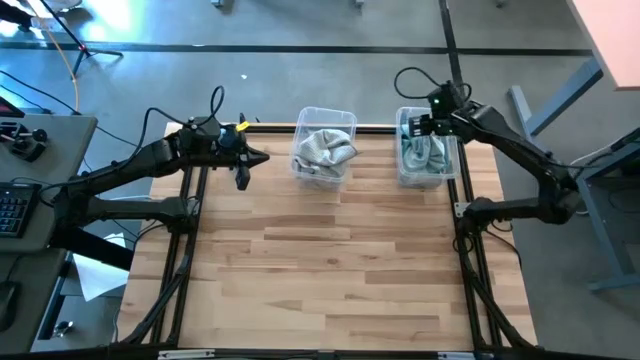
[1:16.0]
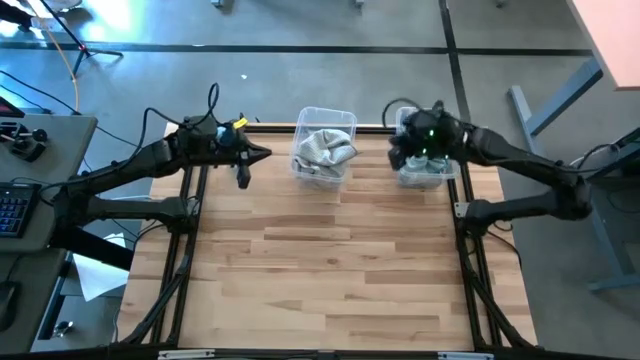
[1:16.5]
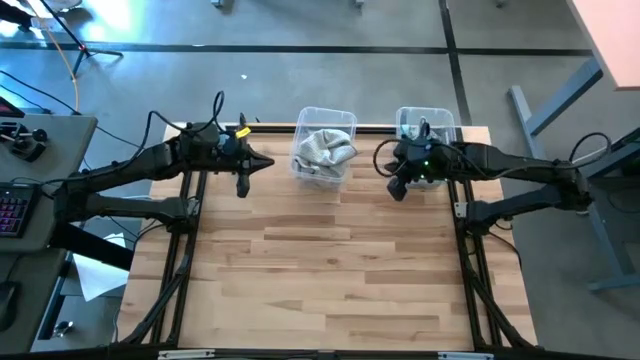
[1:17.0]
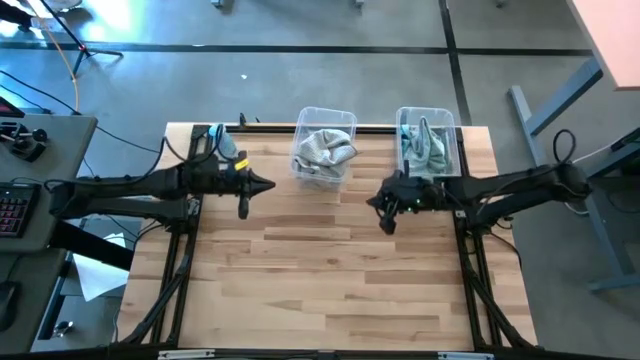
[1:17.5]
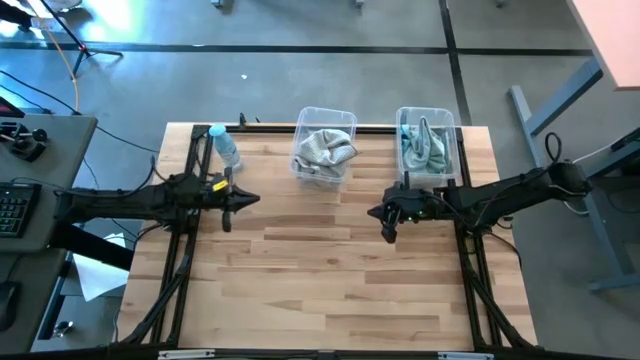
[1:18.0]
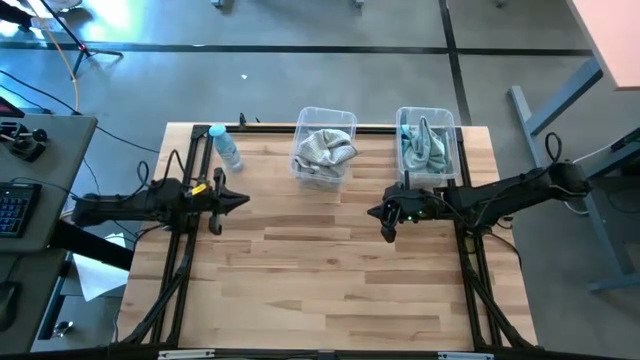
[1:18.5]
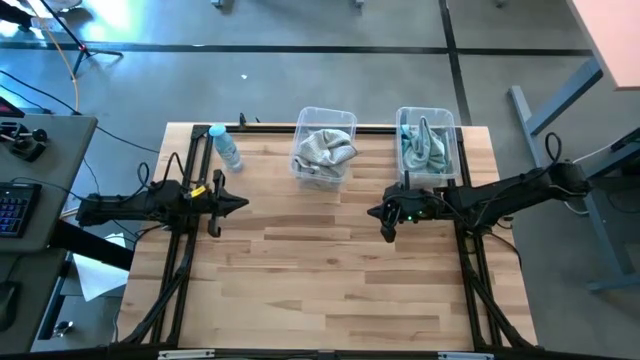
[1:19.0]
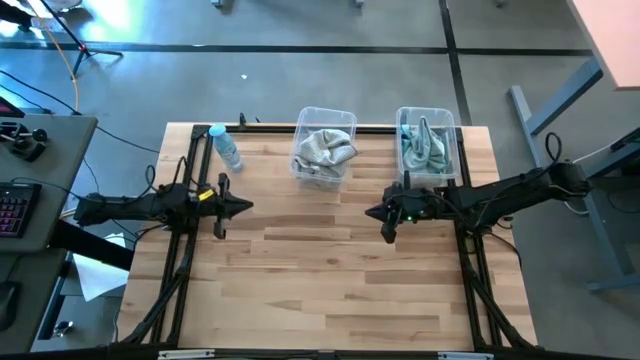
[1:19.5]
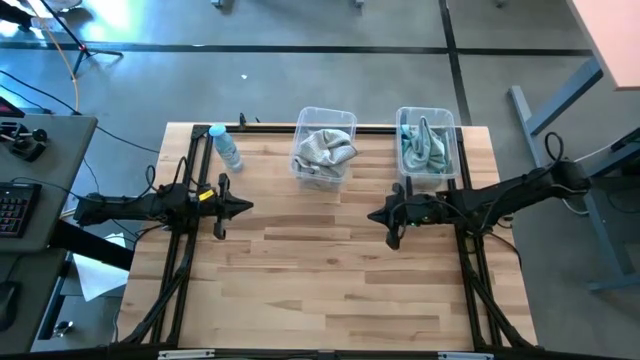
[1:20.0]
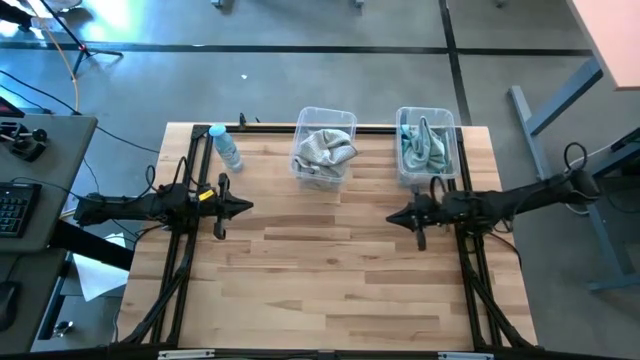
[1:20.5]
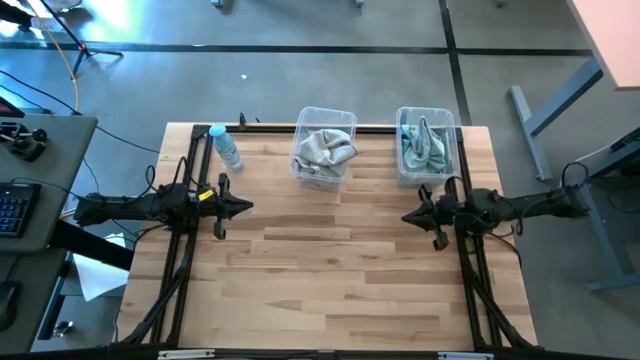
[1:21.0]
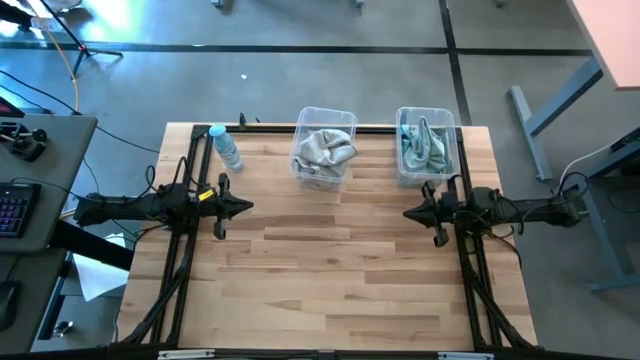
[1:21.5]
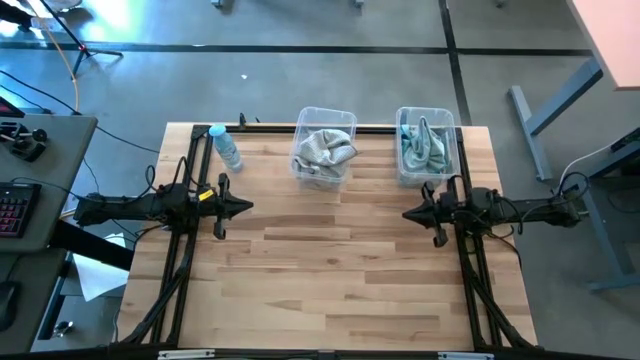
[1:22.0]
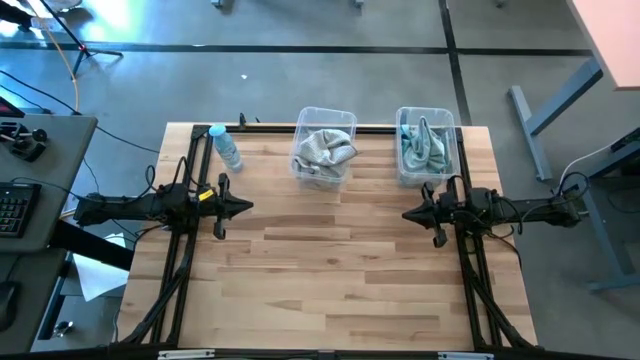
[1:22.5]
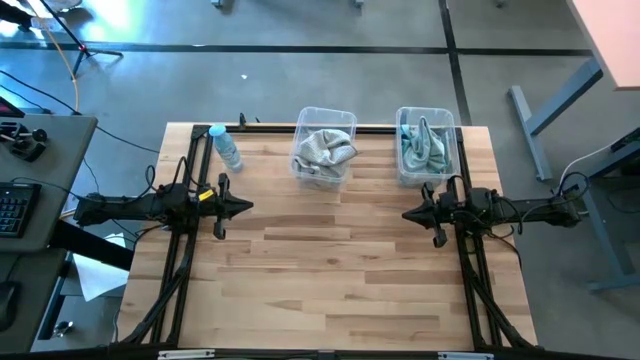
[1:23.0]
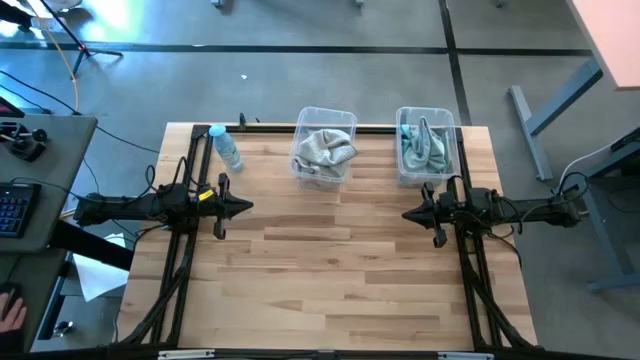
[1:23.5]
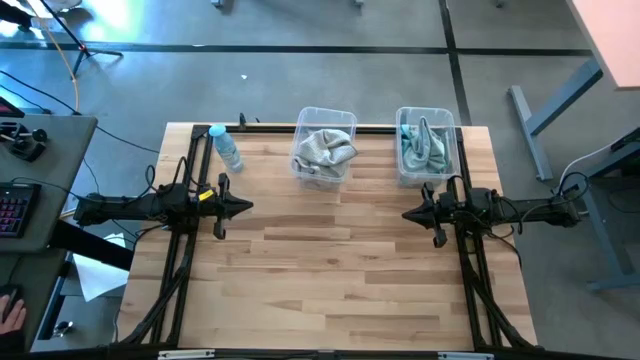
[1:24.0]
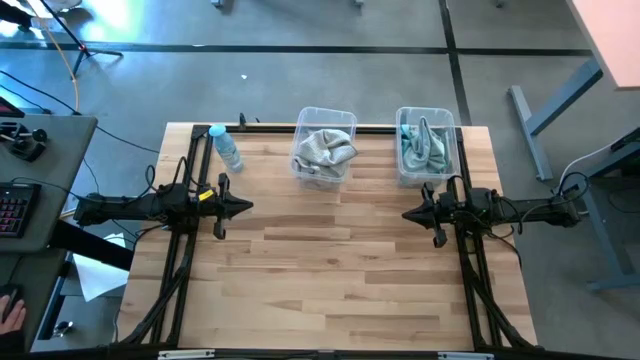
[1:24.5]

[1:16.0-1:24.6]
Task: Sort microfiber towel by color & place in baskets
Return to Home Position

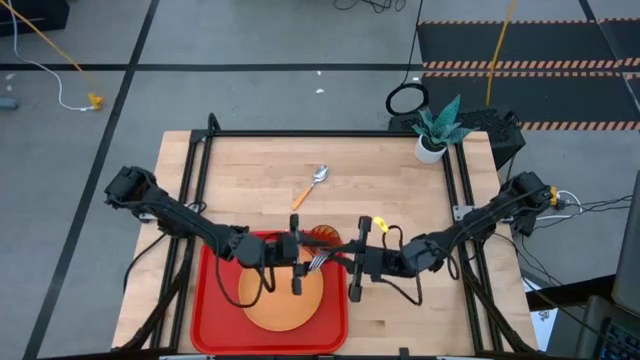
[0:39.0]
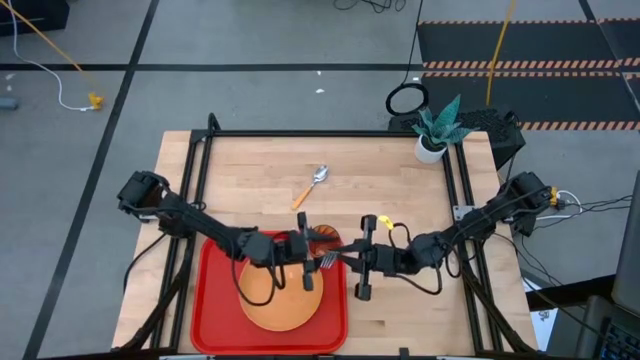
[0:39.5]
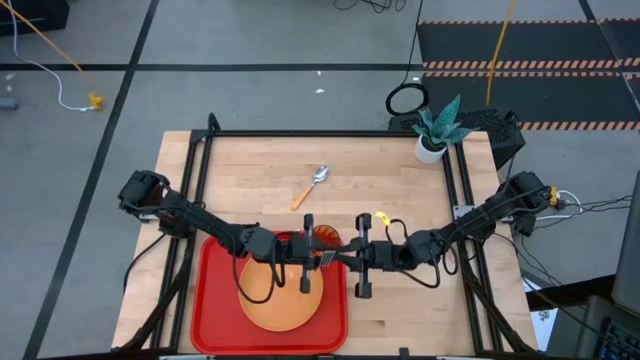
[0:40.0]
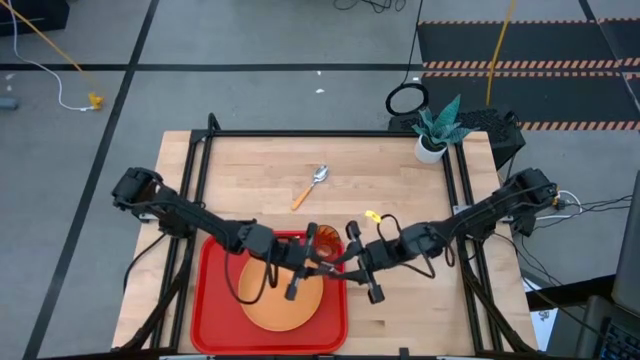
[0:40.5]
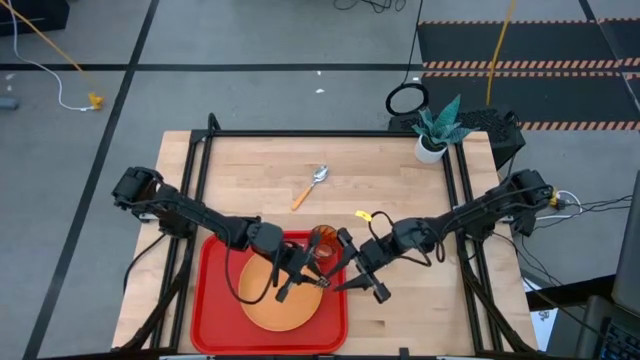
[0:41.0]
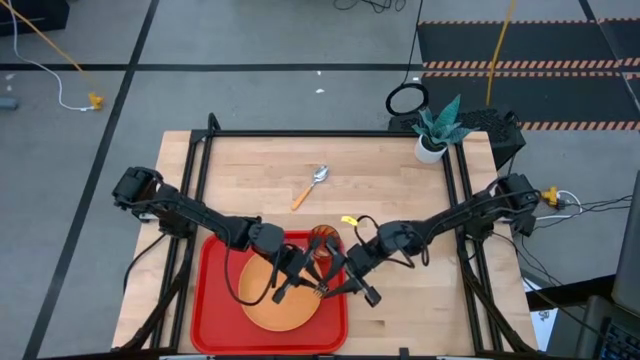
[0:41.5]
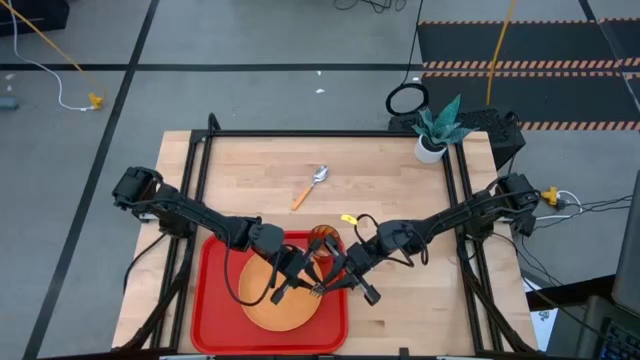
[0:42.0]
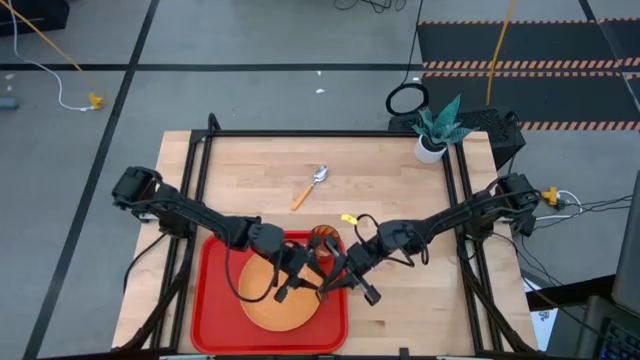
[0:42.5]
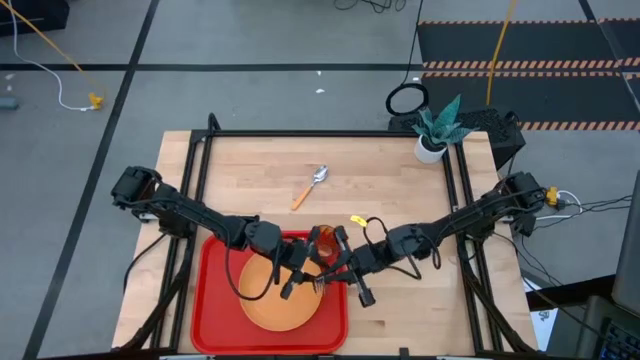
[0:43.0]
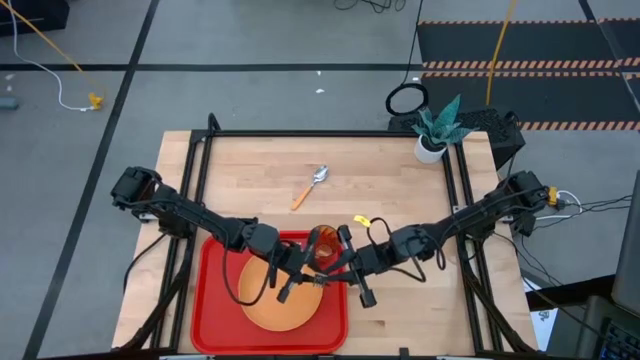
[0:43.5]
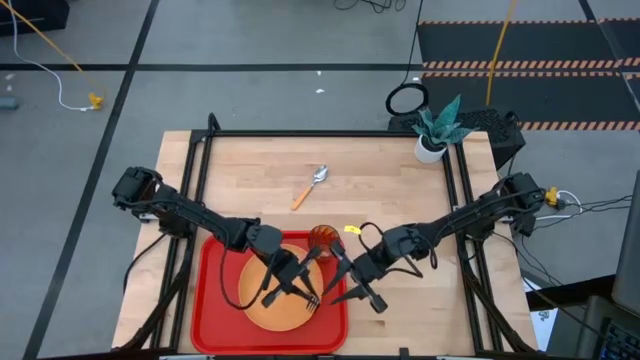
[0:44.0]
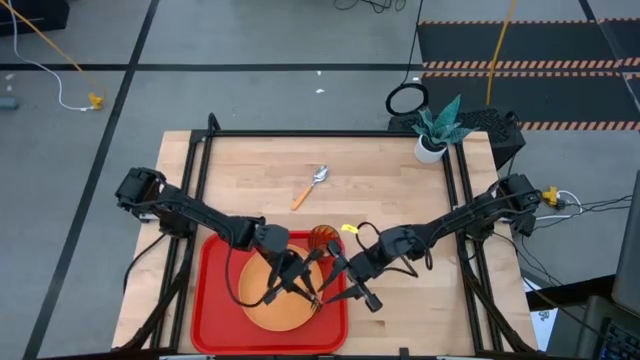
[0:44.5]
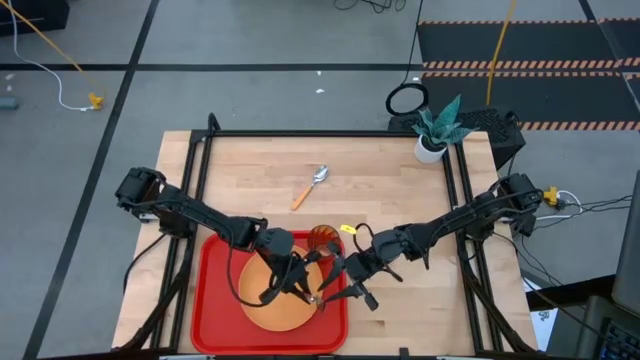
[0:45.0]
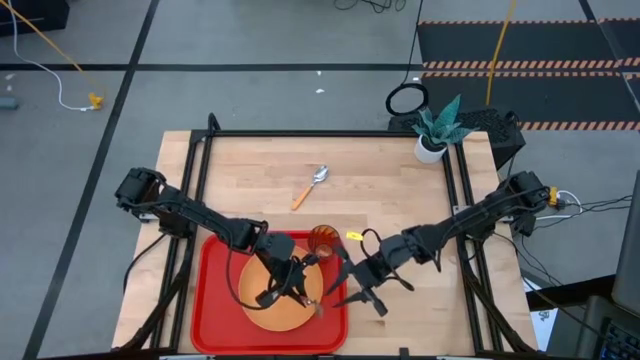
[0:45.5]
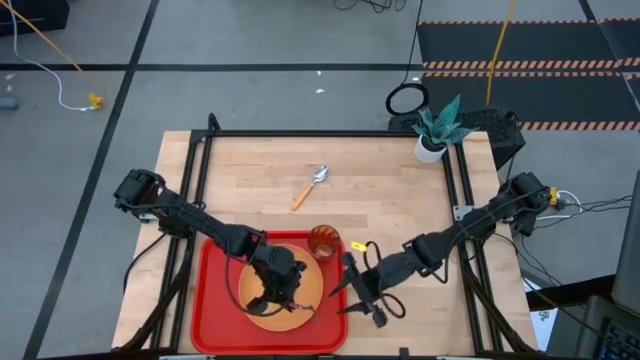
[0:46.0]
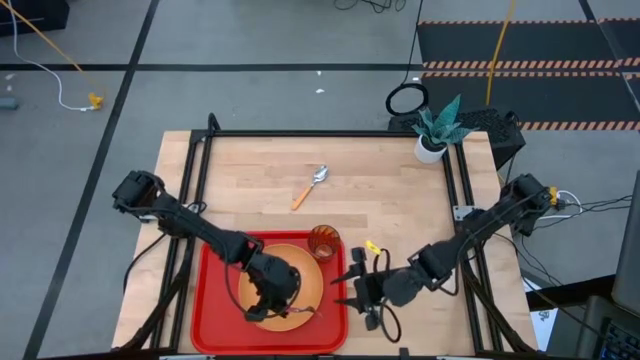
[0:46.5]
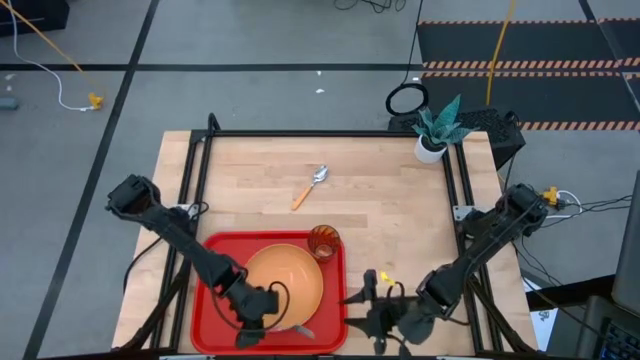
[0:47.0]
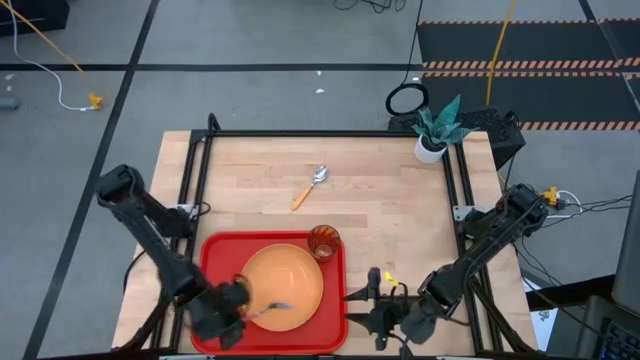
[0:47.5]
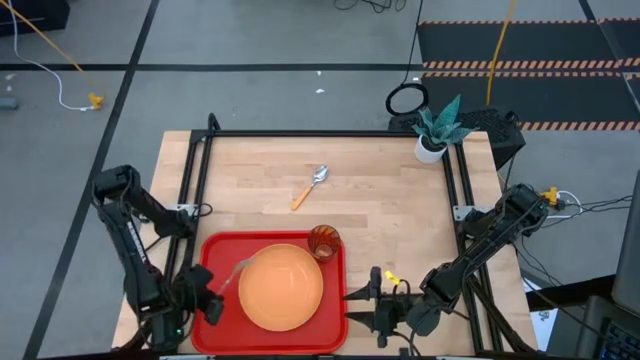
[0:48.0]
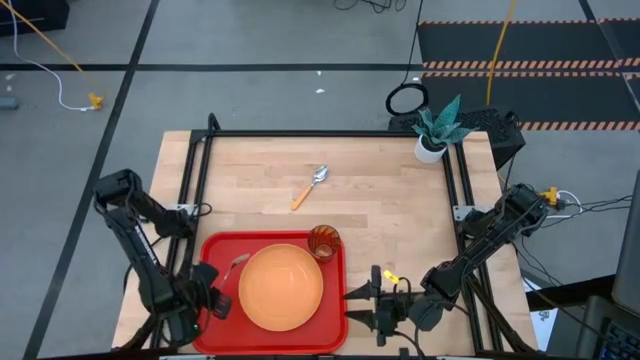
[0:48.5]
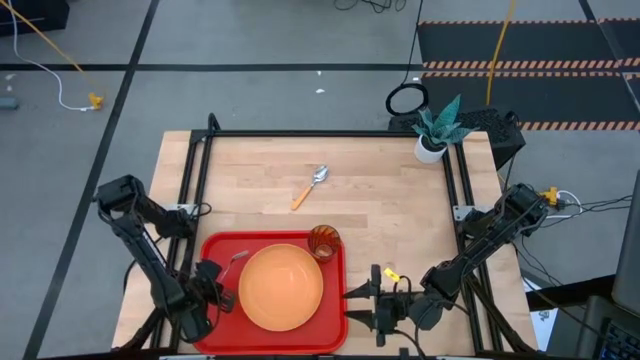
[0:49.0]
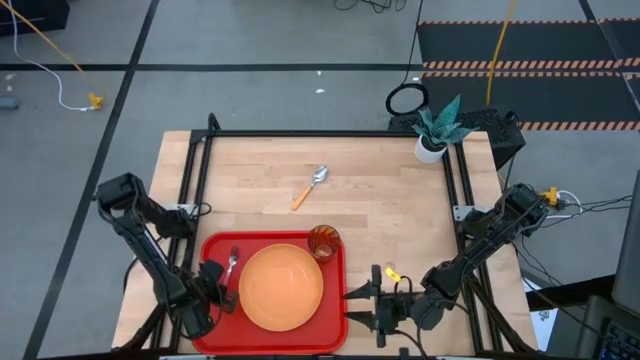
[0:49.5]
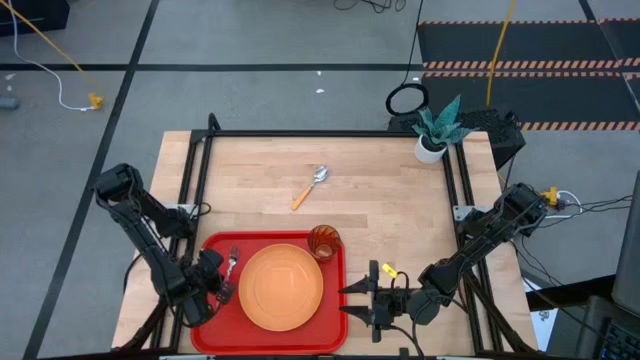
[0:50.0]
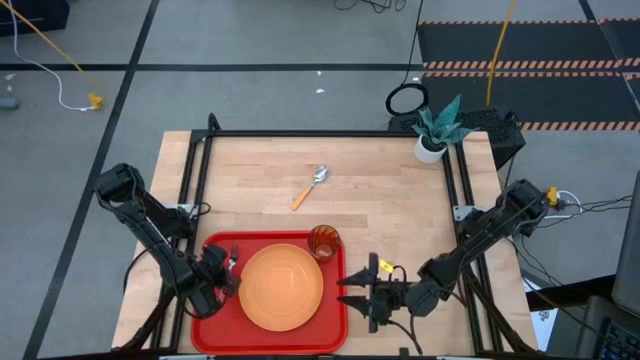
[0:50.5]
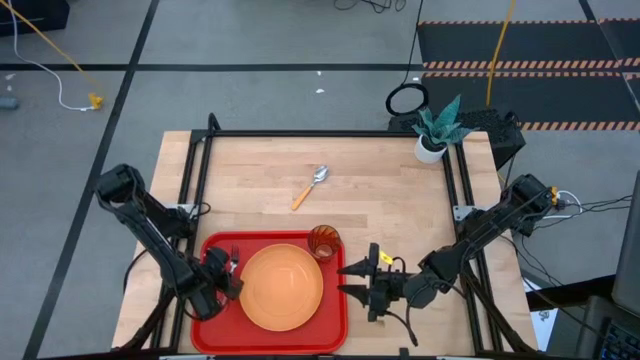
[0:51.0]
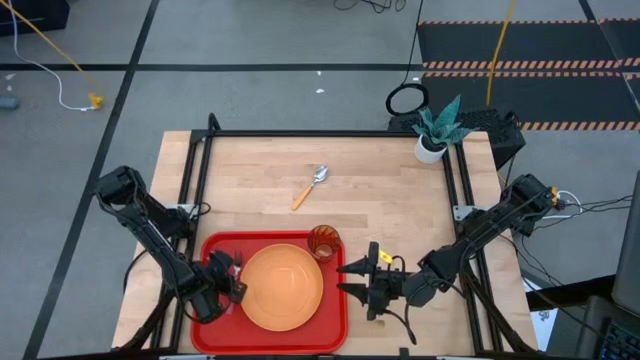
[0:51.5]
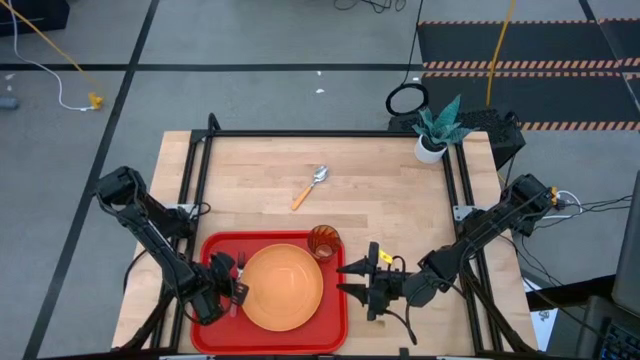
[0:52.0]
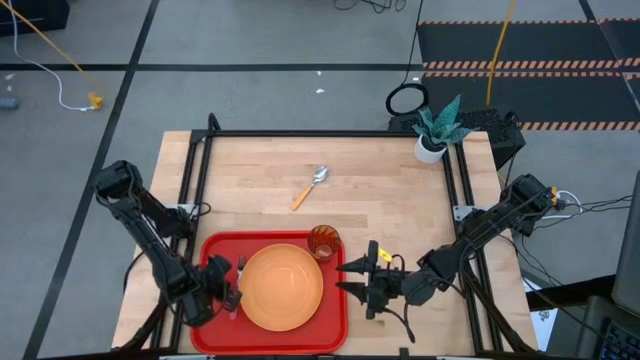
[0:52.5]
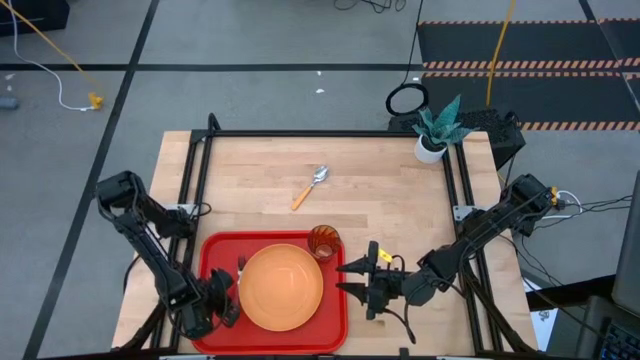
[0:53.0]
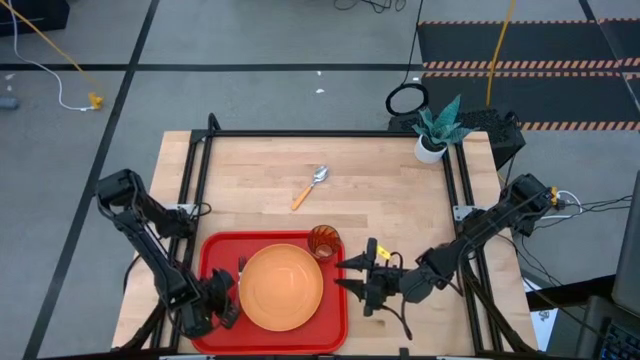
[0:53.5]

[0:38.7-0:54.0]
Task: Pick and place plate/cup/fork/spoon on tray
Put the pink fork on the red serving tray to the left of the orange plate
